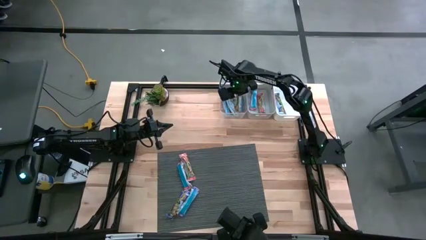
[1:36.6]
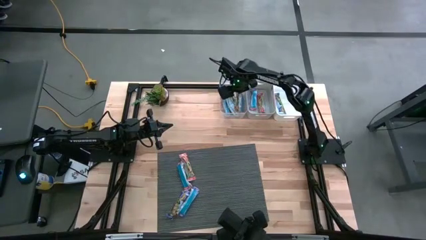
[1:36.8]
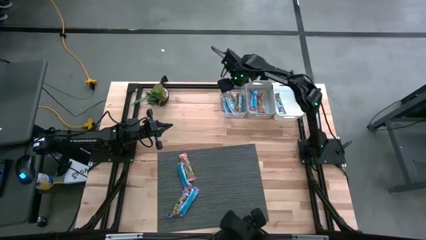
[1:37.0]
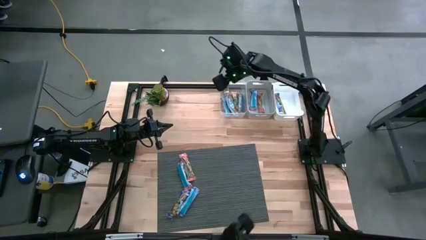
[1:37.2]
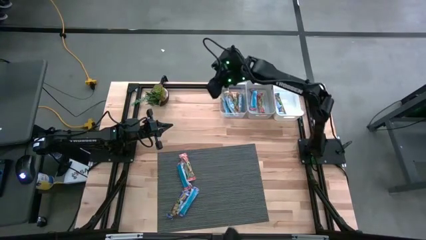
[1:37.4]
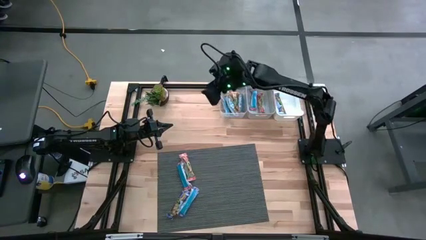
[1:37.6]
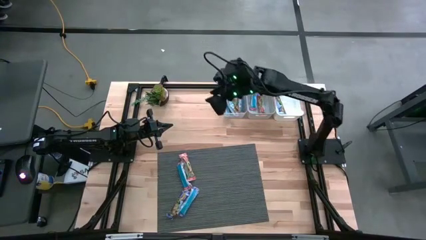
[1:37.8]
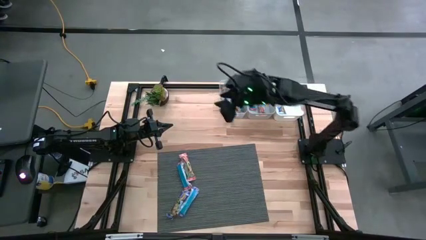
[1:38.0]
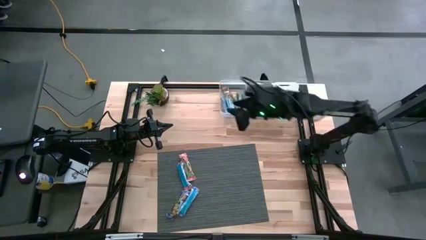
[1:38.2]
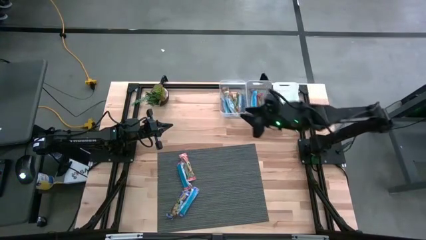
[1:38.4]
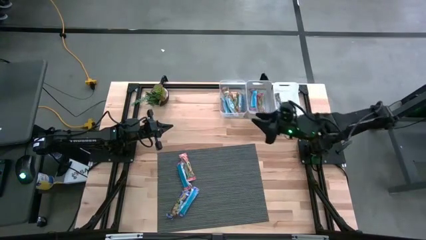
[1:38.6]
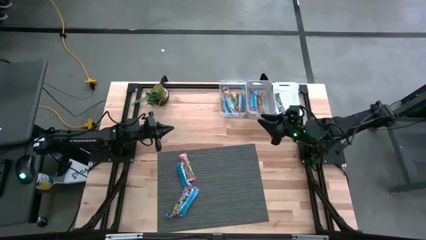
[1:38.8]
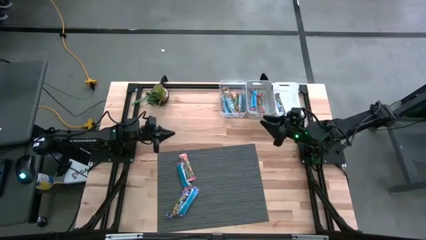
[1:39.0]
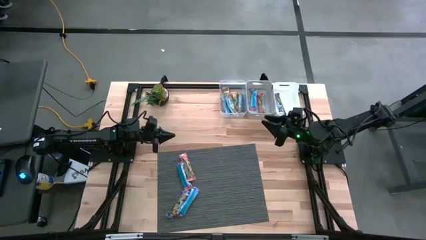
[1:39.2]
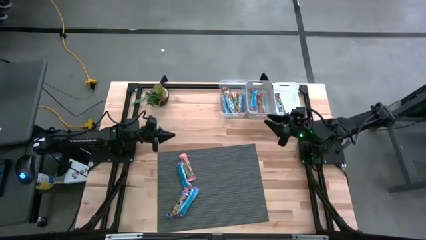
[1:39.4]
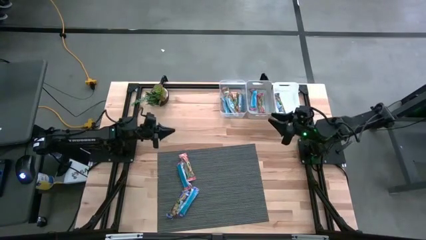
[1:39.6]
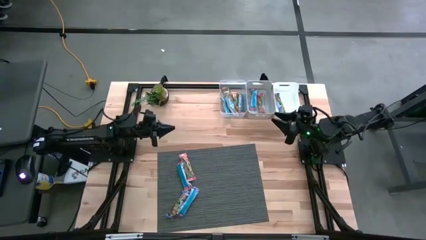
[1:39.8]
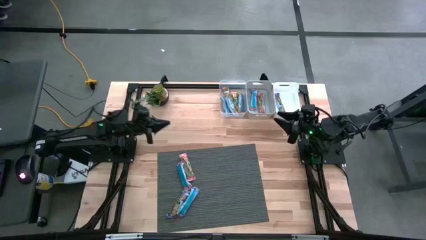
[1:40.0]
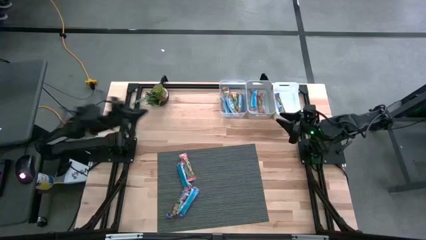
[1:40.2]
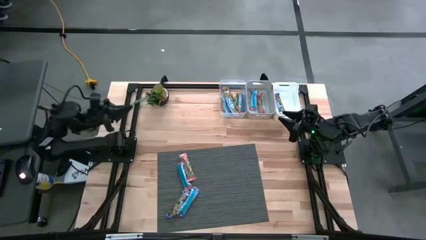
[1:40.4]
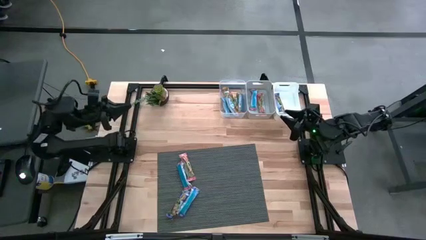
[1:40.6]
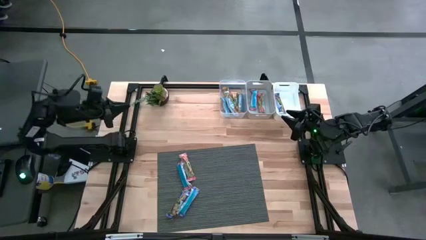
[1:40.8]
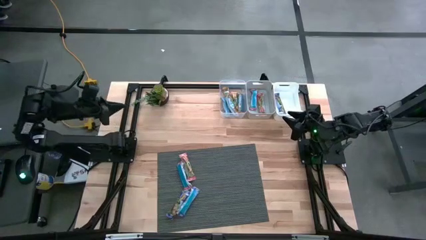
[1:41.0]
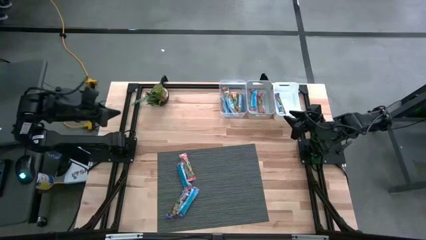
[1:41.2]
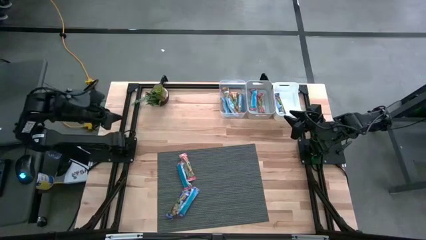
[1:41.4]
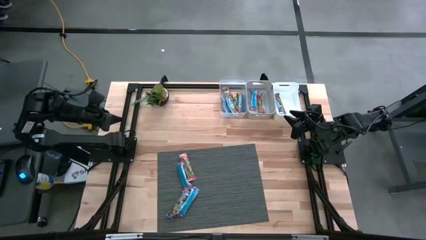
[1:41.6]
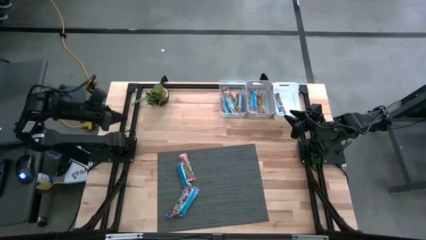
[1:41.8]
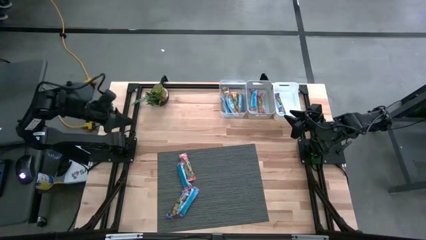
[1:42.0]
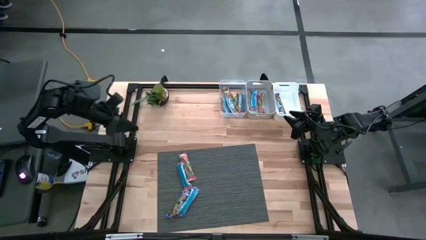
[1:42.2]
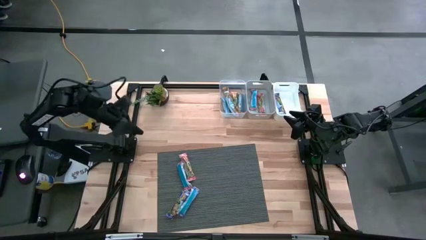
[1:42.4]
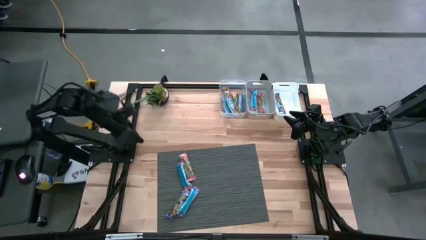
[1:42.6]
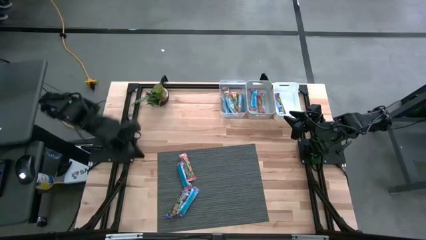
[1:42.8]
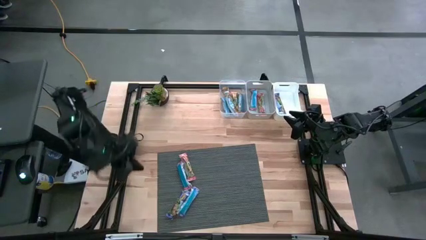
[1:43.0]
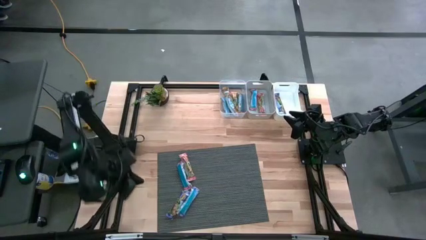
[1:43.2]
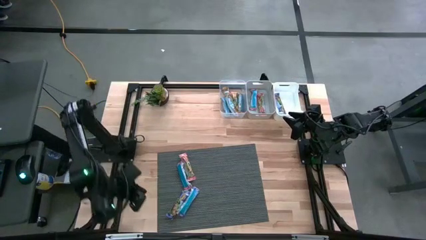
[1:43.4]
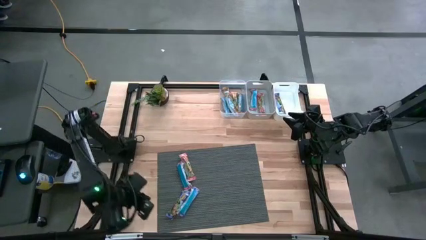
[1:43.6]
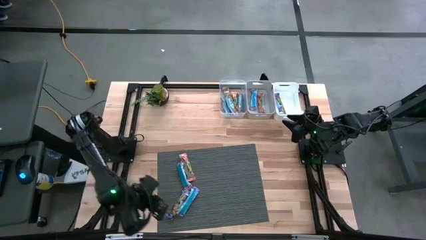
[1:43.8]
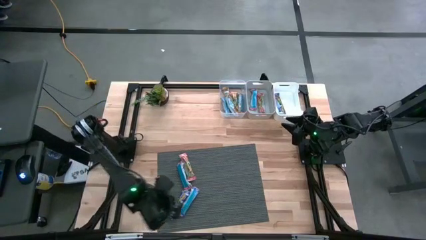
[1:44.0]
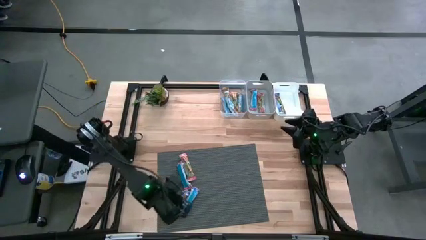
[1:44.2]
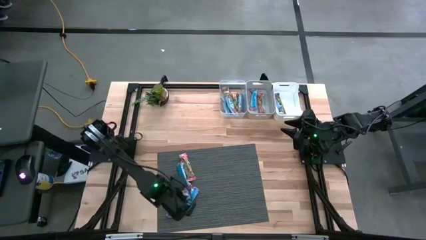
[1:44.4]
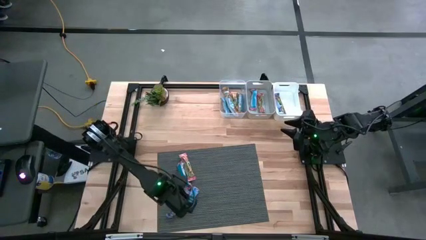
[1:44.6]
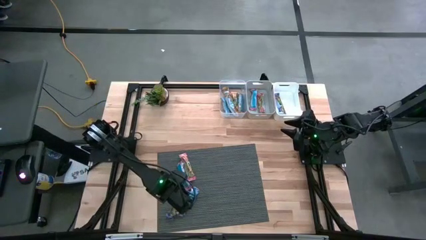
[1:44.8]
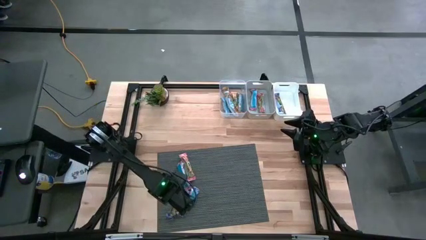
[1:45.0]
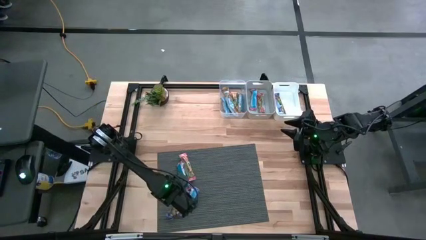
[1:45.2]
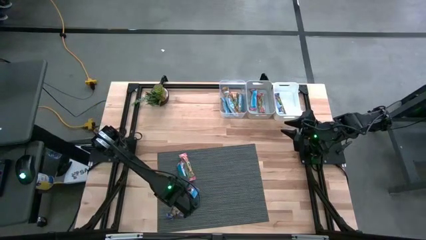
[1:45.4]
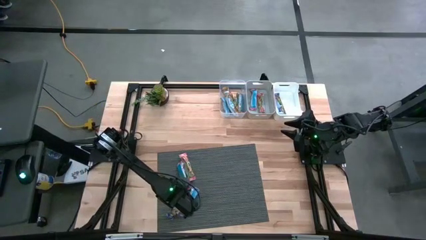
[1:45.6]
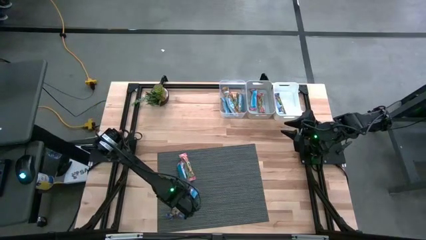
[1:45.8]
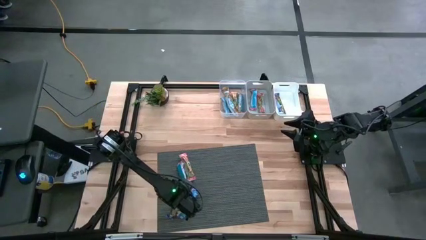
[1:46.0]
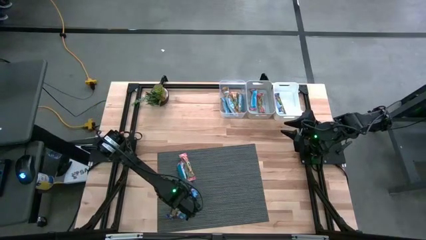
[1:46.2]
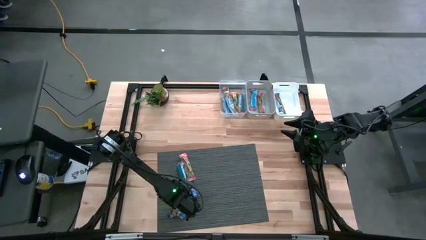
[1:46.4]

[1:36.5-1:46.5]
Task: Pick and place Granola Bars by type
Put the blue granola bar into the white bin

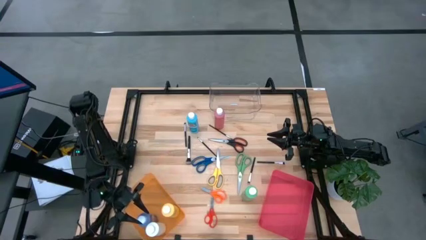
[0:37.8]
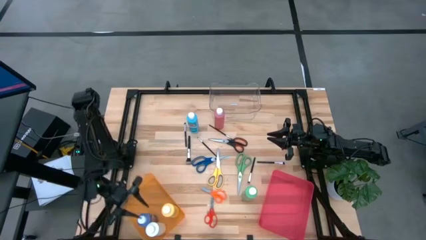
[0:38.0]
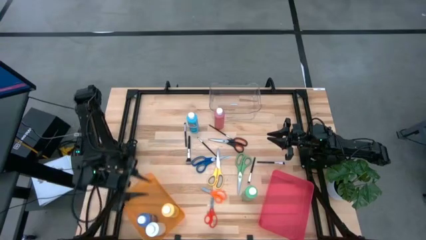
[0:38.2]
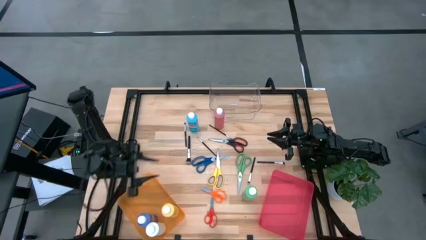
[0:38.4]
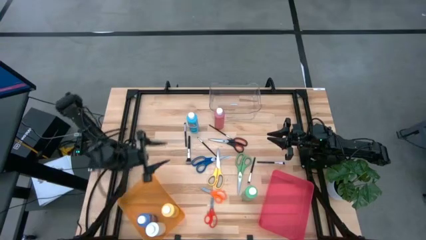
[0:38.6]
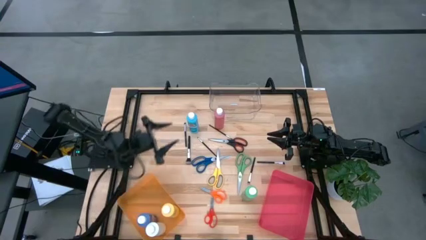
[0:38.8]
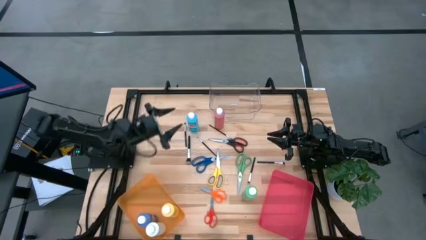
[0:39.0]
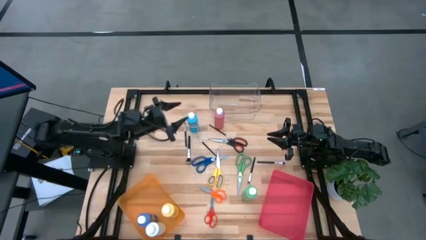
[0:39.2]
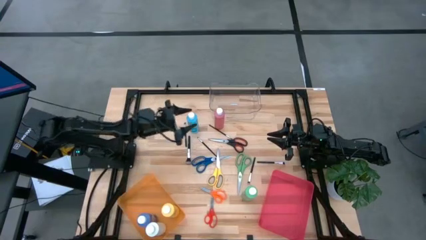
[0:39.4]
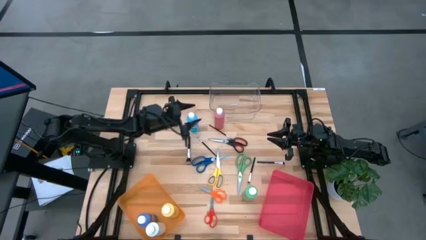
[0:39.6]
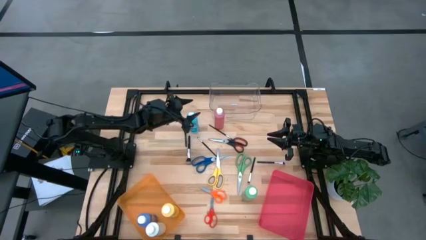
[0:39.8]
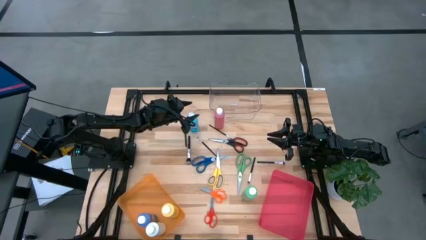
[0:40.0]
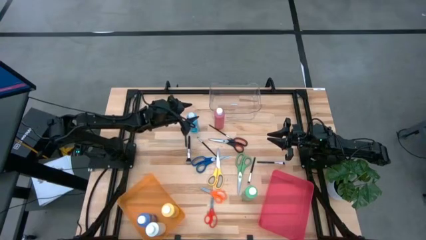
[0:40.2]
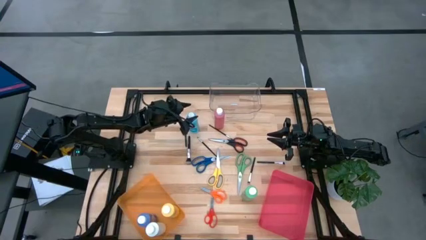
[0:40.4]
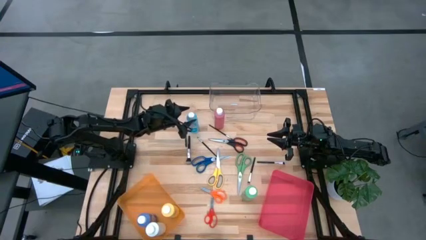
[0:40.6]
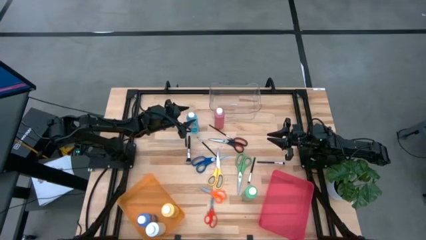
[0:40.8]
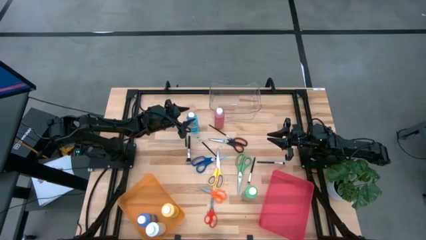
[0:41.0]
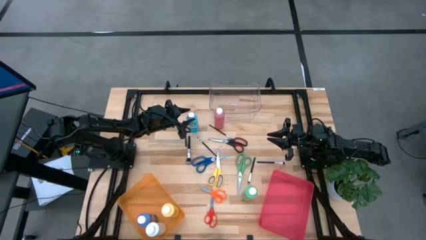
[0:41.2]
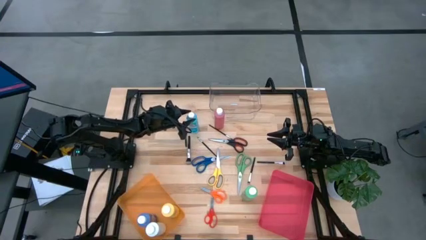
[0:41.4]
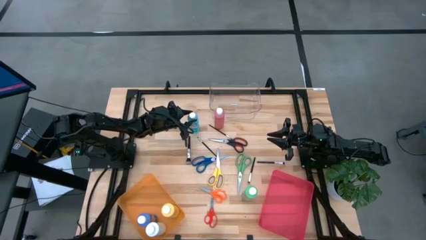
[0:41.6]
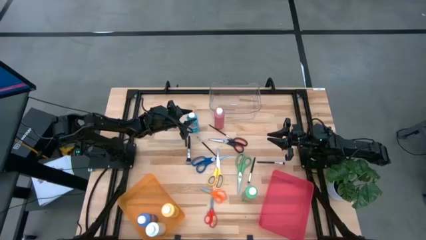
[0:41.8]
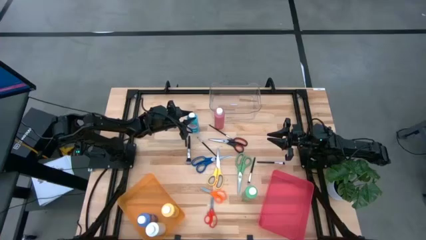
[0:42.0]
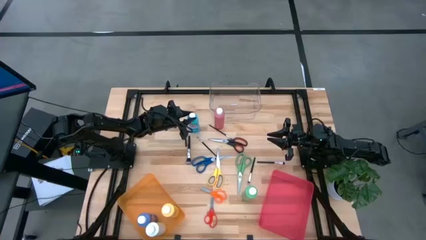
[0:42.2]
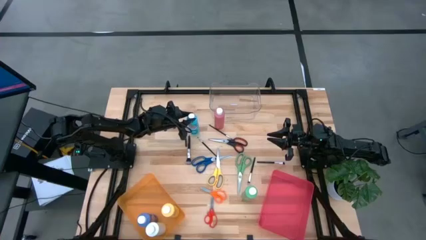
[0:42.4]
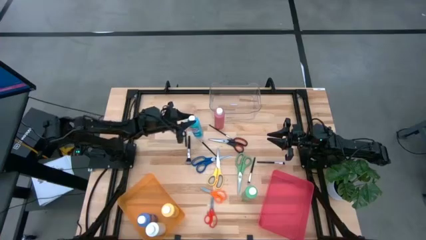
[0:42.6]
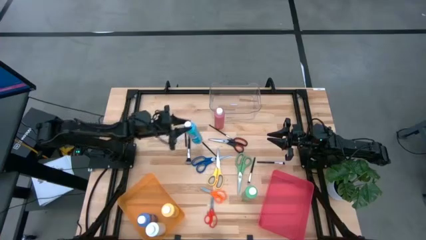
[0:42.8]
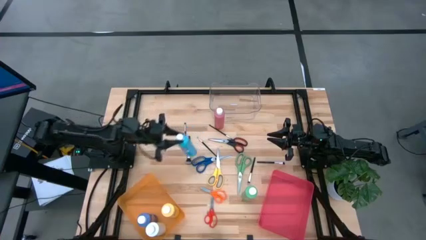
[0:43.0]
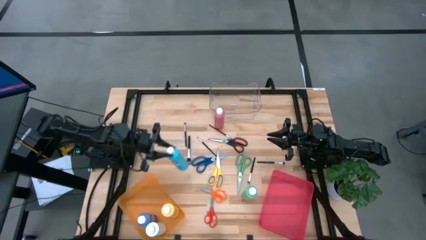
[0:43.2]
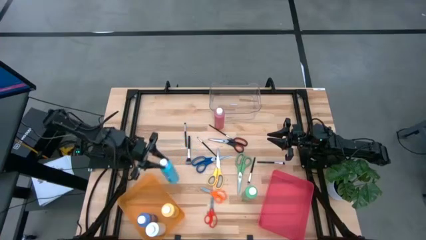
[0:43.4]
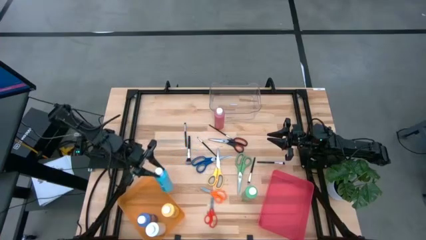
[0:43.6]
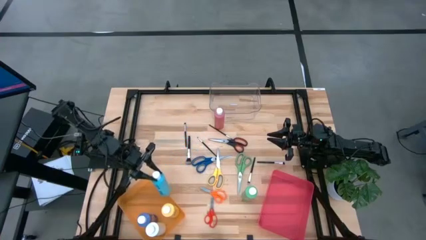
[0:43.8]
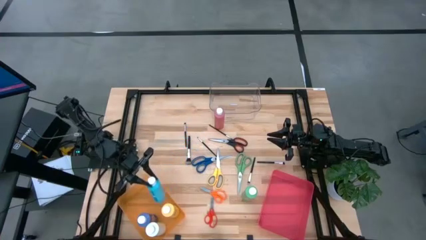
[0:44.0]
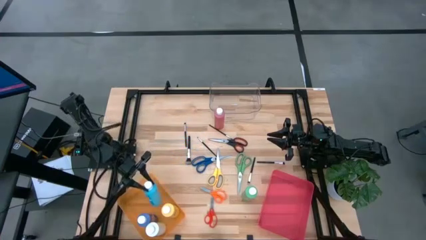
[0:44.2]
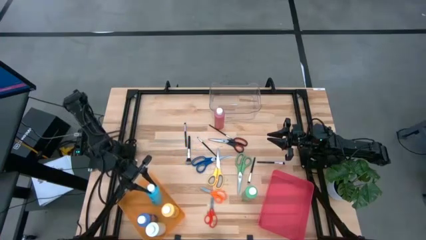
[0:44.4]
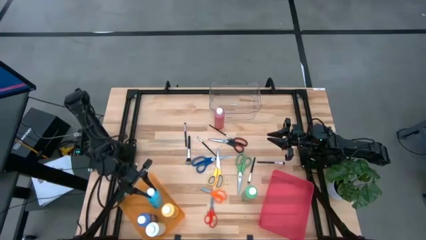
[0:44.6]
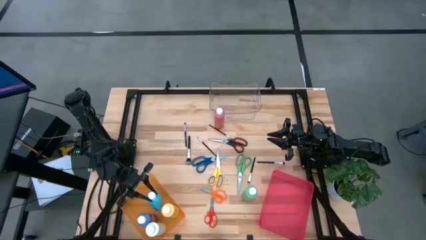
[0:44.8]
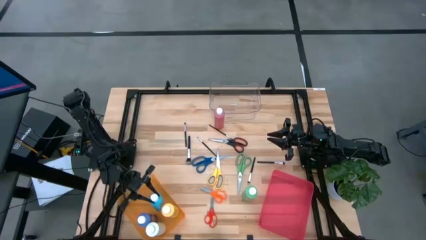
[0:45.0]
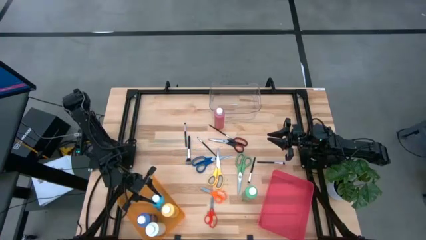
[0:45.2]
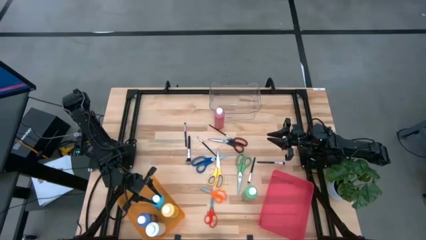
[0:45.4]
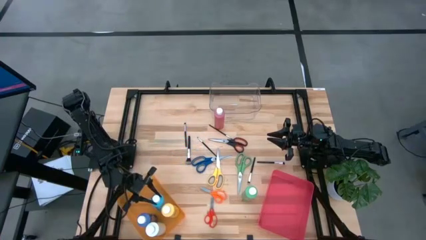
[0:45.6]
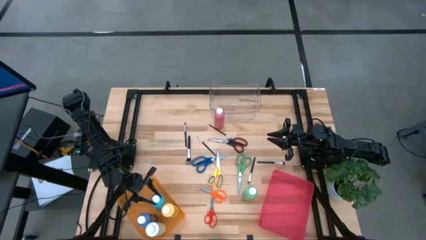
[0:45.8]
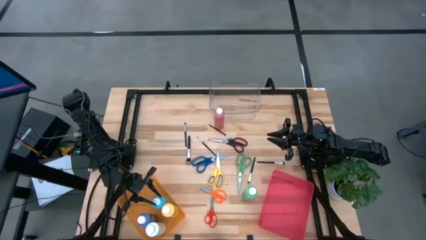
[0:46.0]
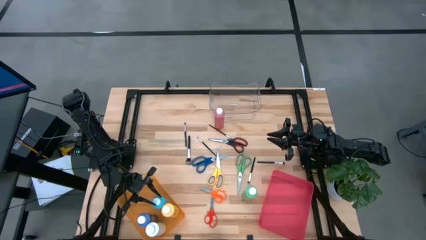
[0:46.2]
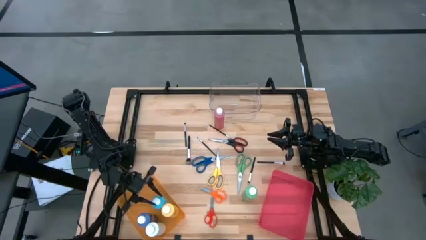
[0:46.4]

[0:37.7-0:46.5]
Task: Pick & Place Paint Supplies
Put the blue paint bottle into the orange bin
